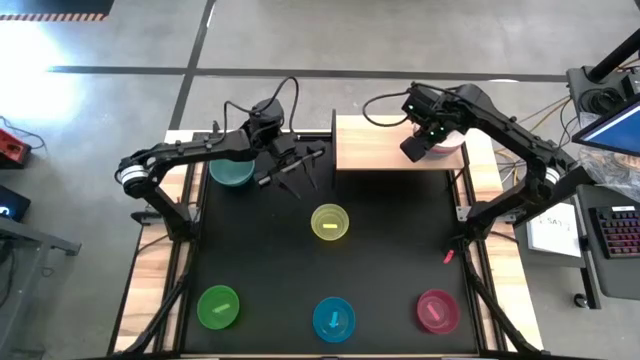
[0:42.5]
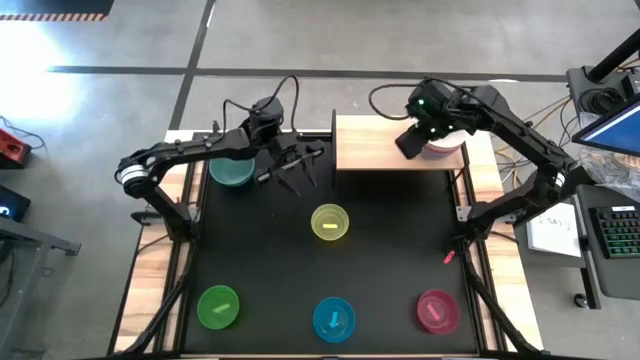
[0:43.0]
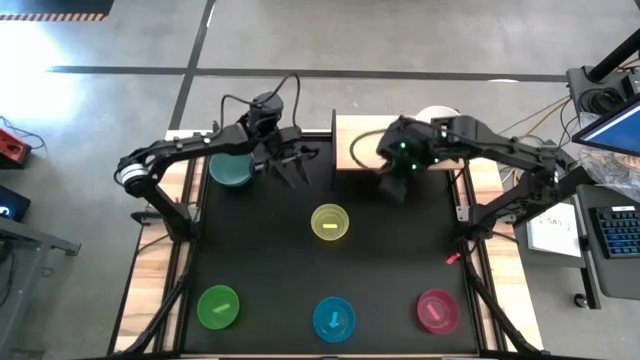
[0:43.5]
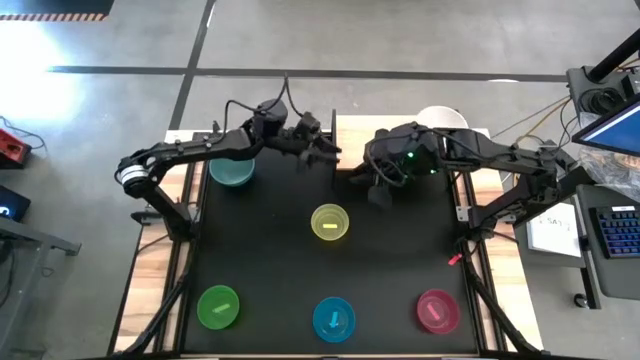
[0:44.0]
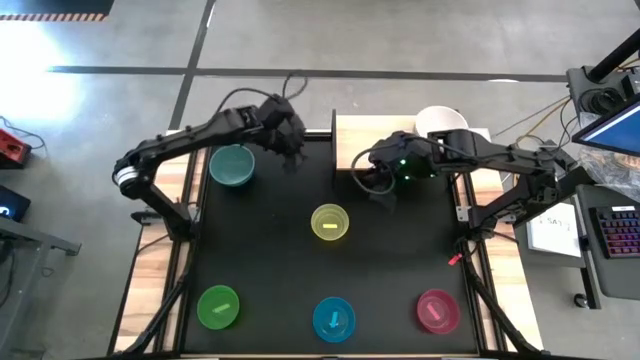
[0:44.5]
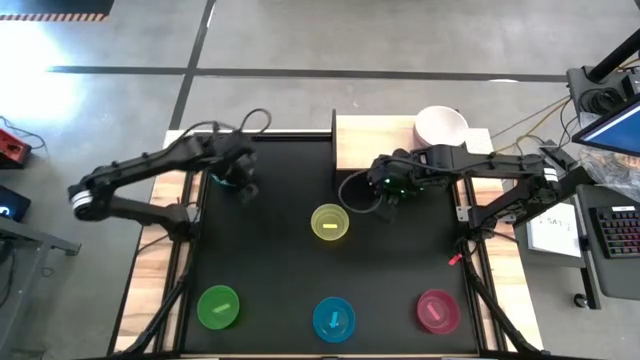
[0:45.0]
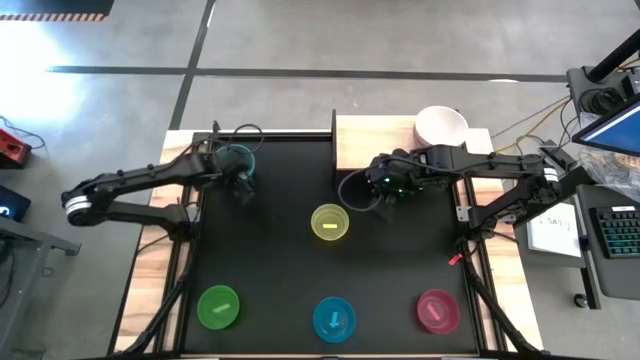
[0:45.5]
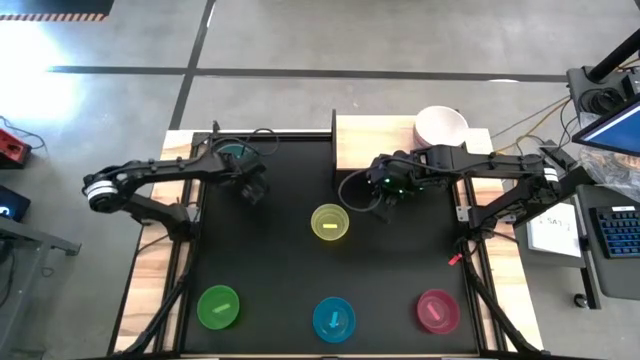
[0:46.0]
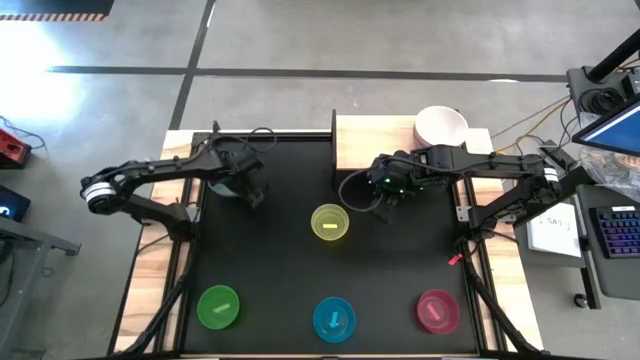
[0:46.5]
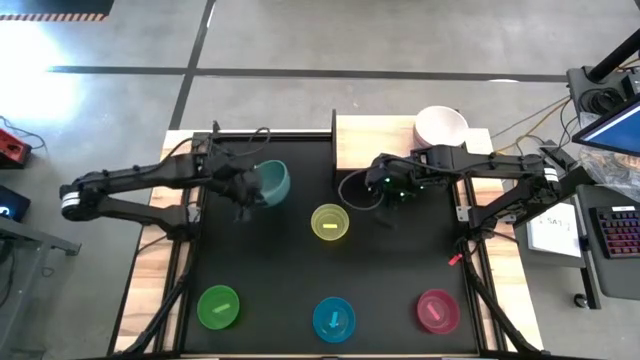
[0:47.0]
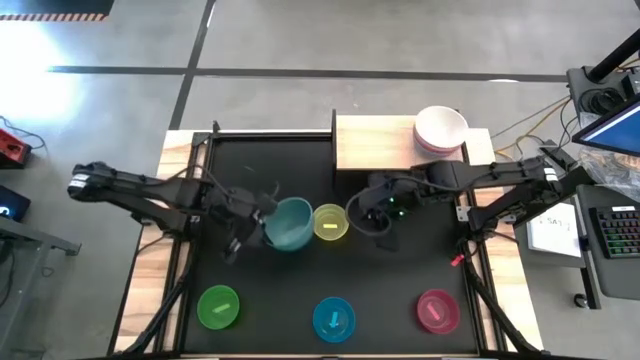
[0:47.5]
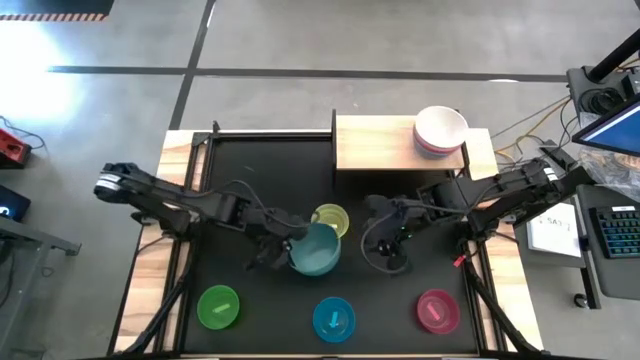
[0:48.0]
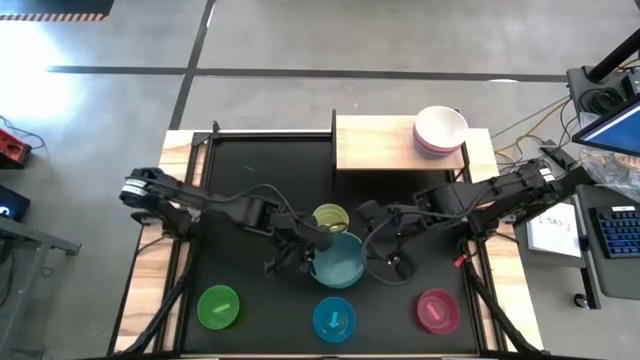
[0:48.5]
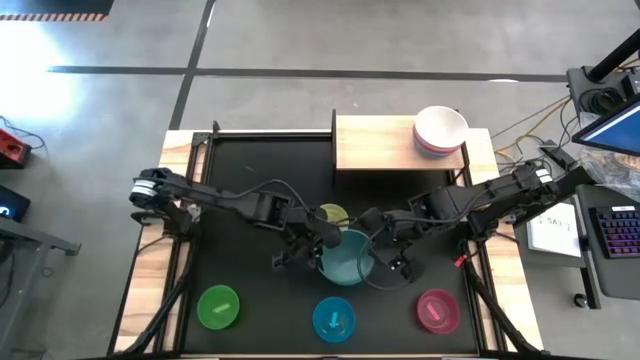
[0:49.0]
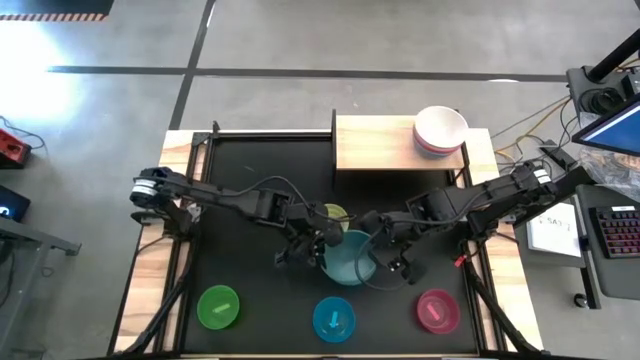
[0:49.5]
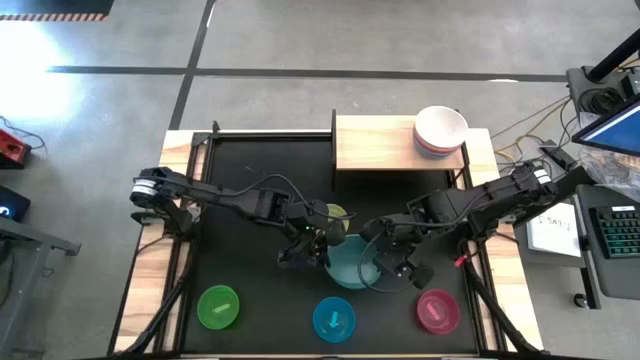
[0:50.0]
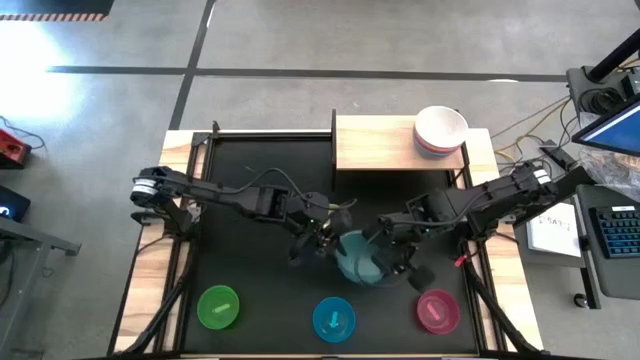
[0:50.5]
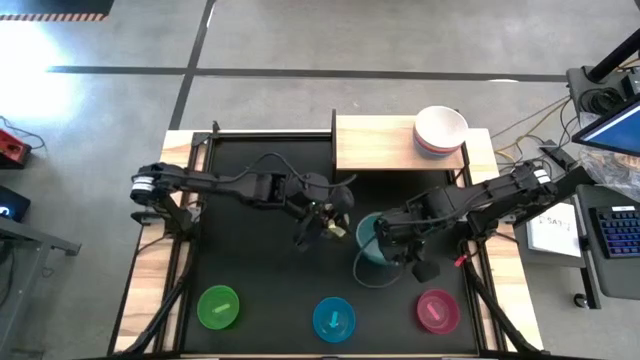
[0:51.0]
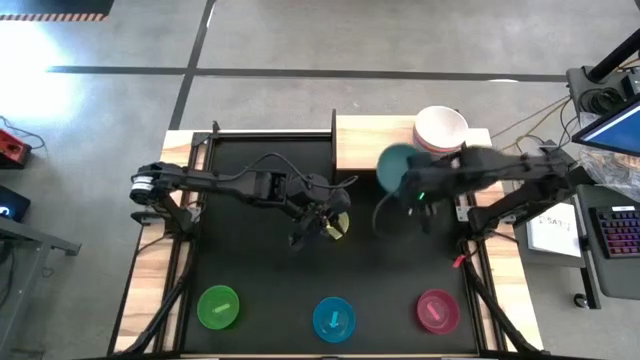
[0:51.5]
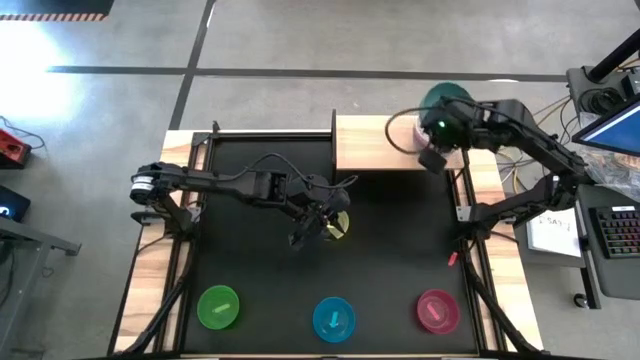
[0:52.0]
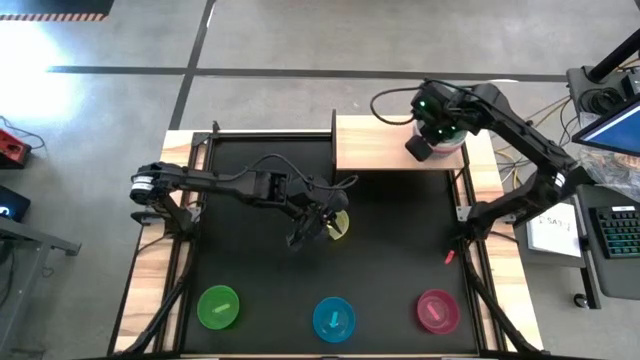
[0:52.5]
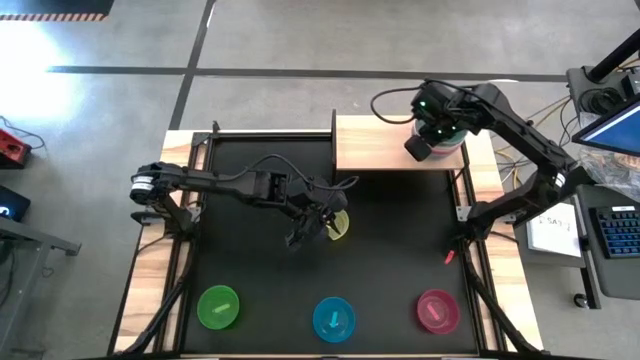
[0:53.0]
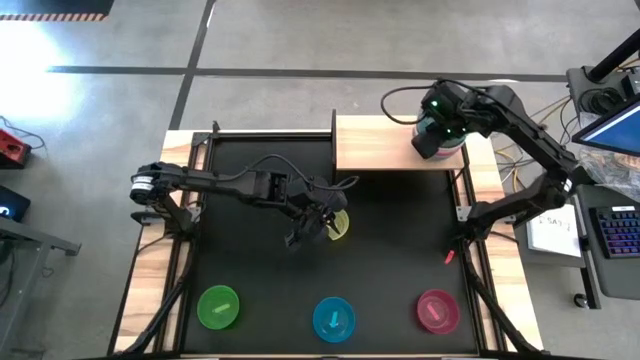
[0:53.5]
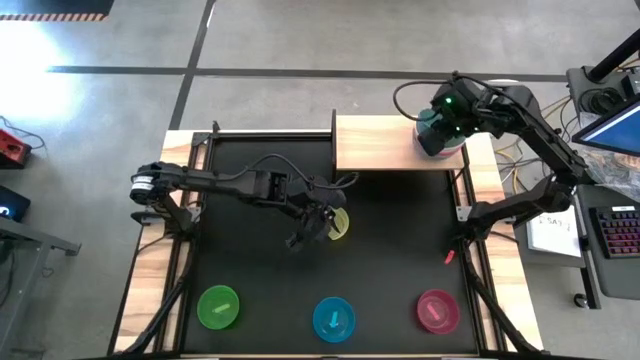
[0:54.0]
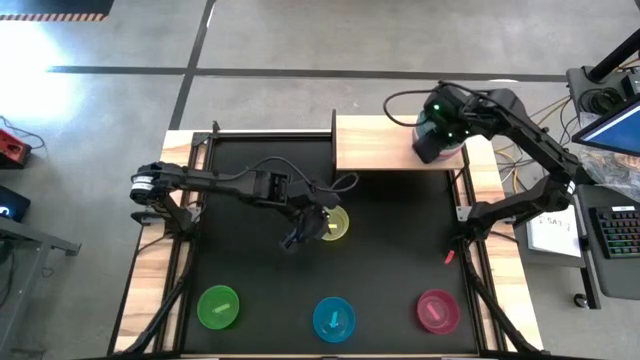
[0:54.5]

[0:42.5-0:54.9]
Task: Place and stack bowls onto a shelf
Stack the green bowl on top of the white stacked bowls on the shelf

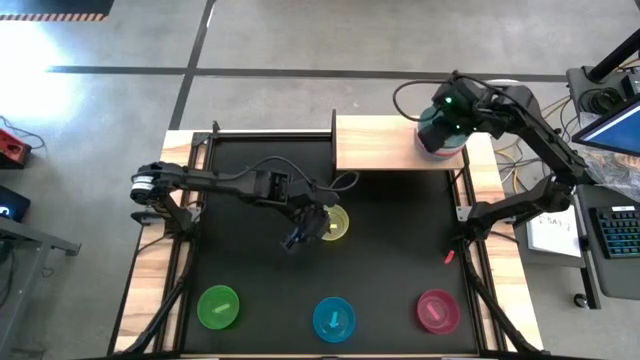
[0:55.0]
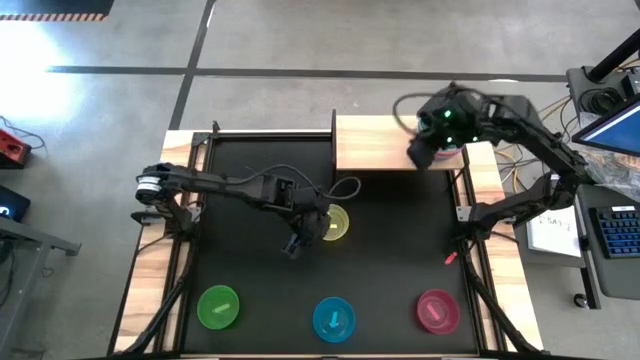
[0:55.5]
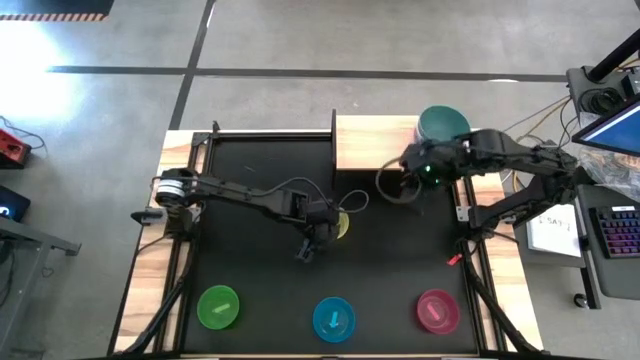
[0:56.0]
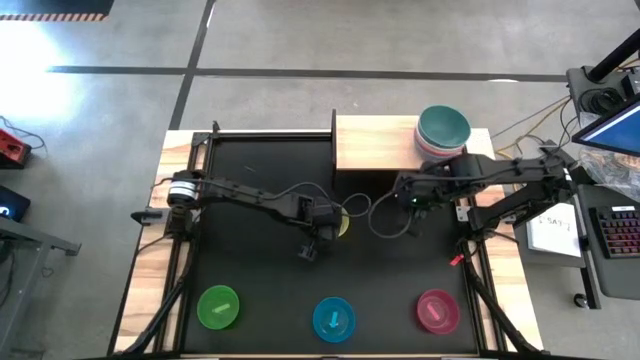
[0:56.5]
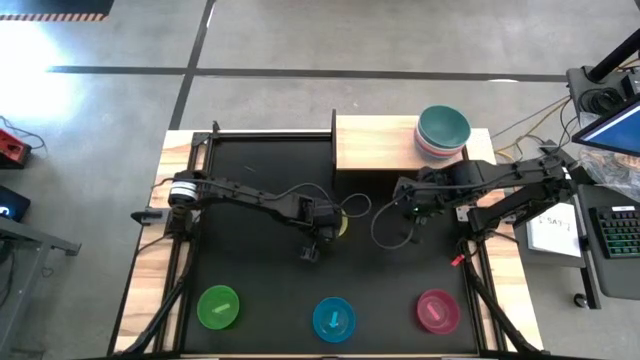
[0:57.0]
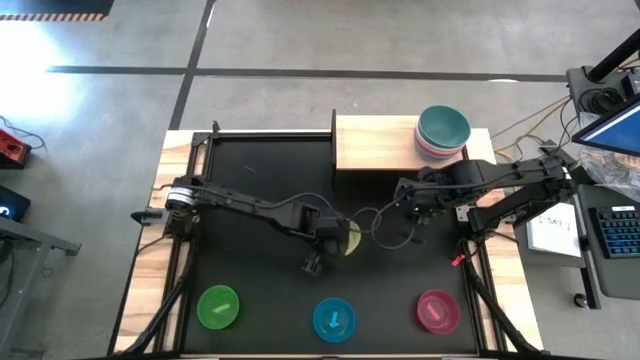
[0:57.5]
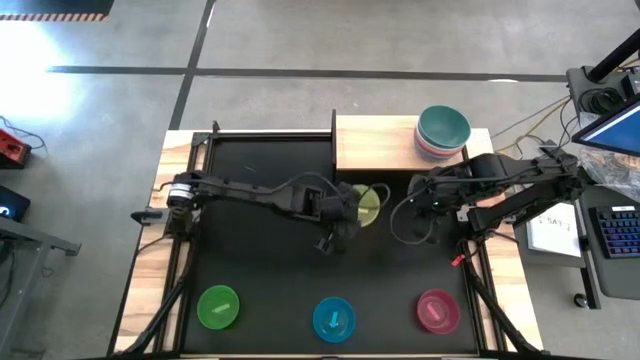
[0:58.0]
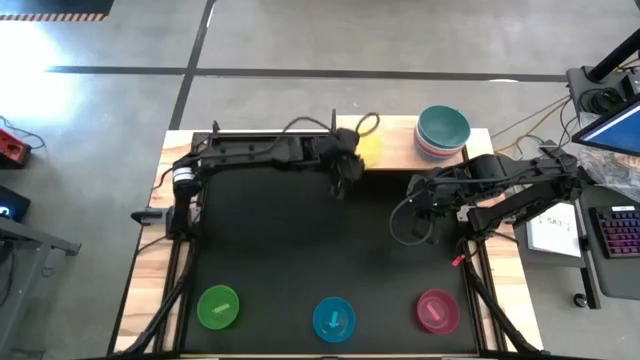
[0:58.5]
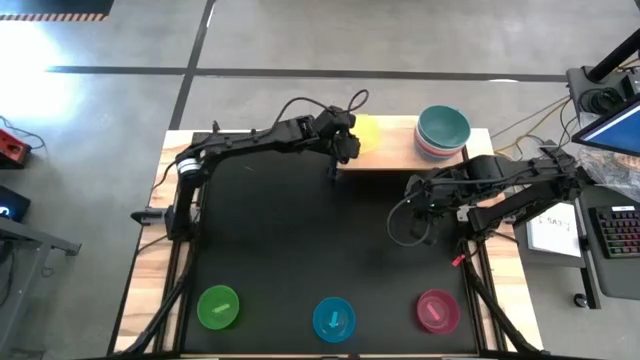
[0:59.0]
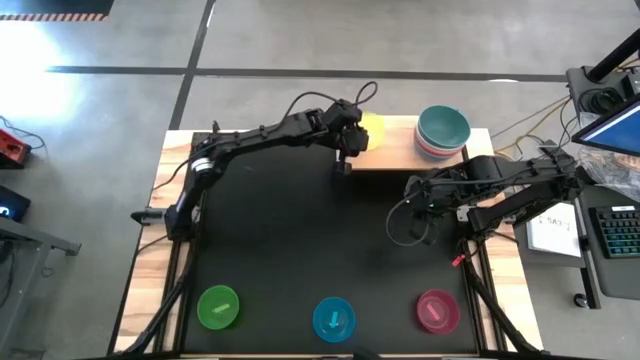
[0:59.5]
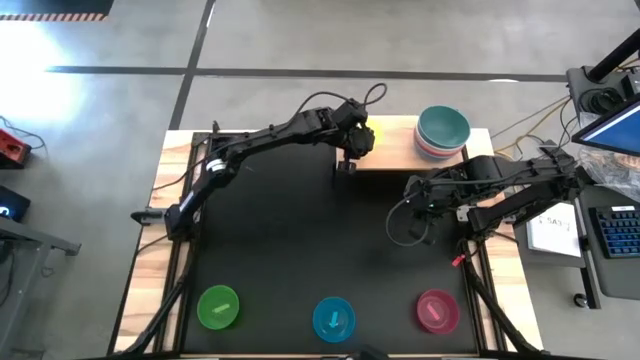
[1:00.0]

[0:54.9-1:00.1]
Put the yellow bowl on the shelf

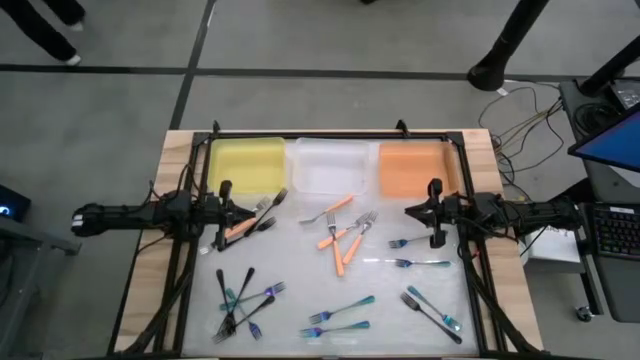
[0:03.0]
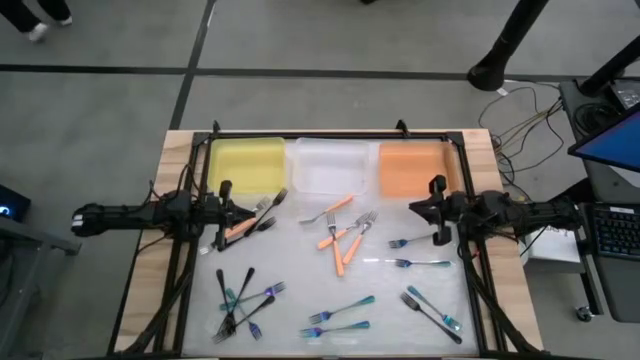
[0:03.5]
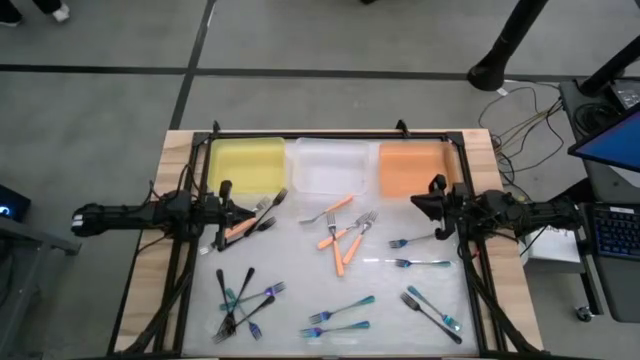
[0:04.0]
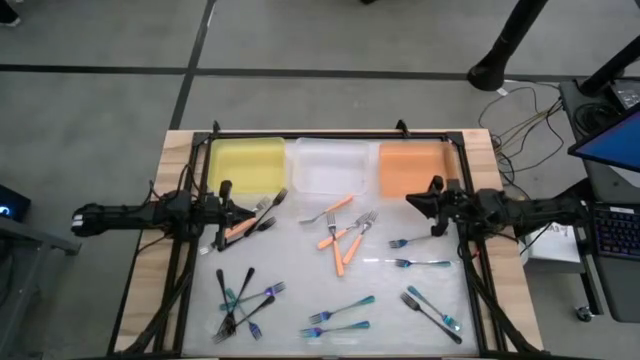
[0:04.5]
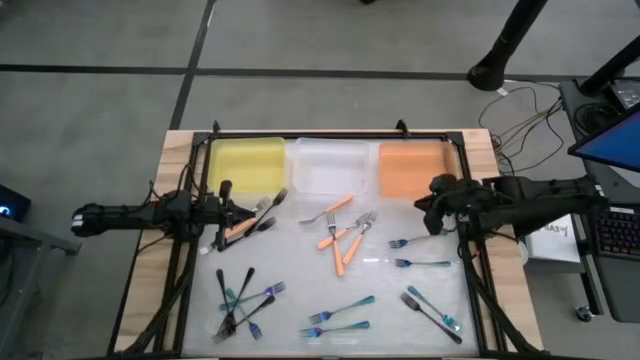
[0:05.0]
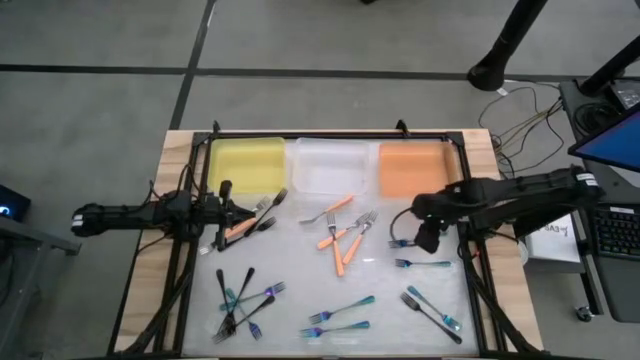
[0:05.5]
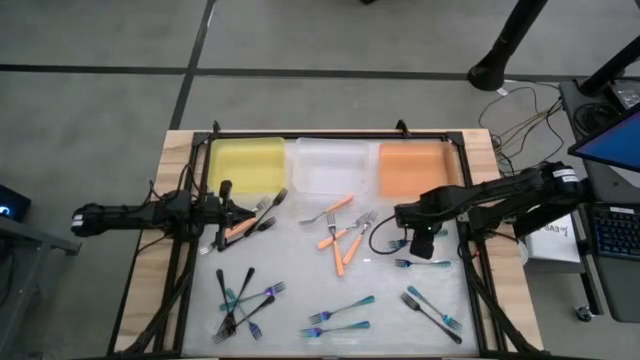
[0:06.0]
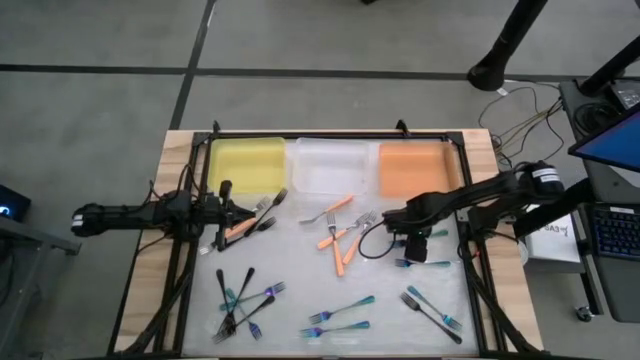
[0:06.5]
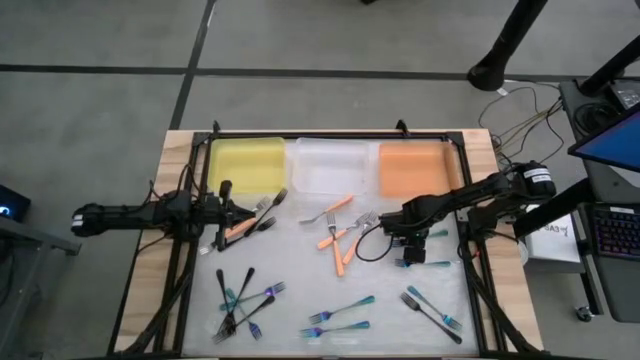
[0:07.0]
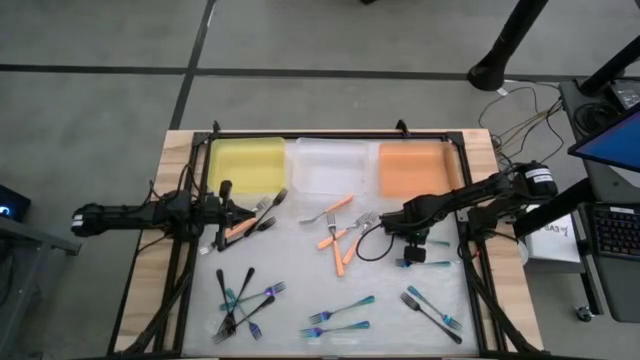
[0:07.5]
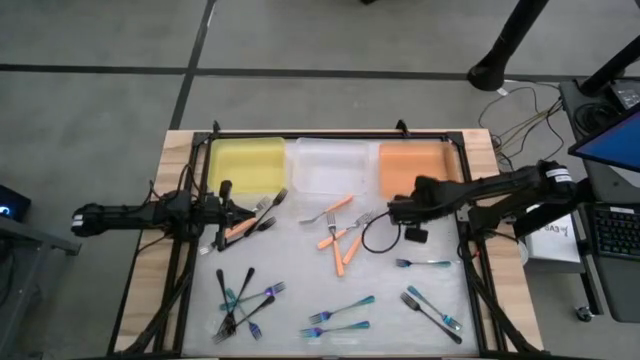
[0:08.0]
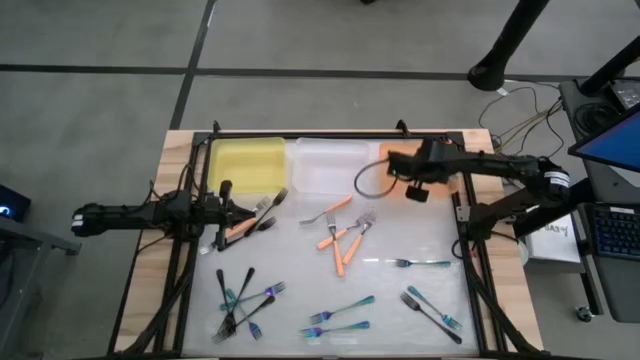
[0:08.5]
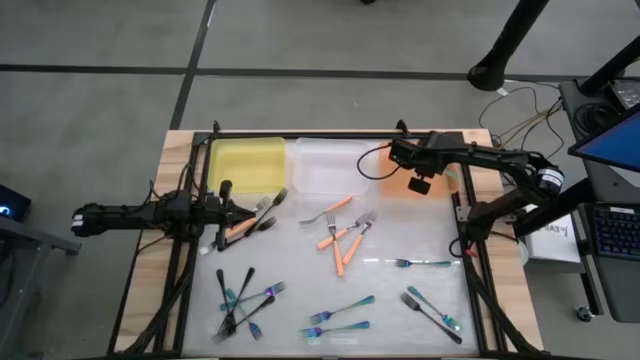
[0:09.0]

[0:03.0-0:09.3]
Task: Sort silverware by color (type)
Put the iridescent fork into the orange bin
